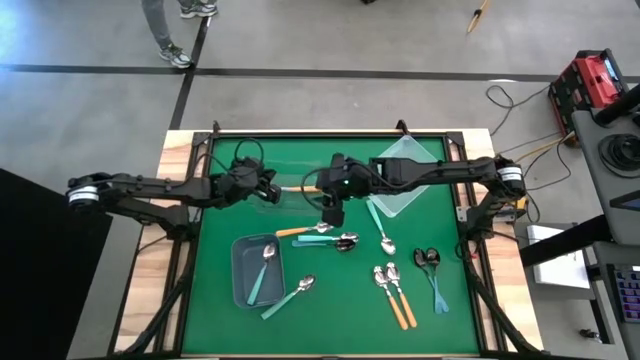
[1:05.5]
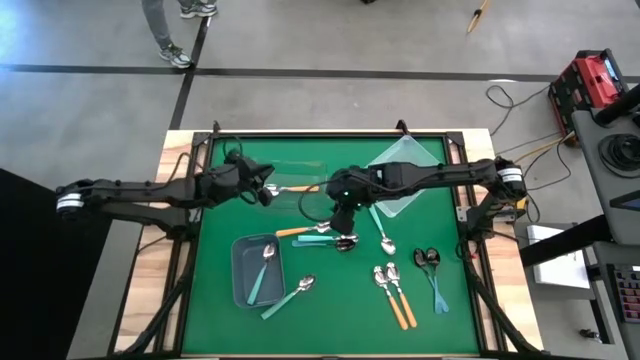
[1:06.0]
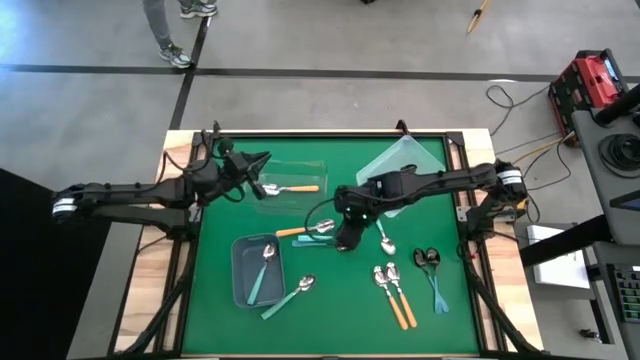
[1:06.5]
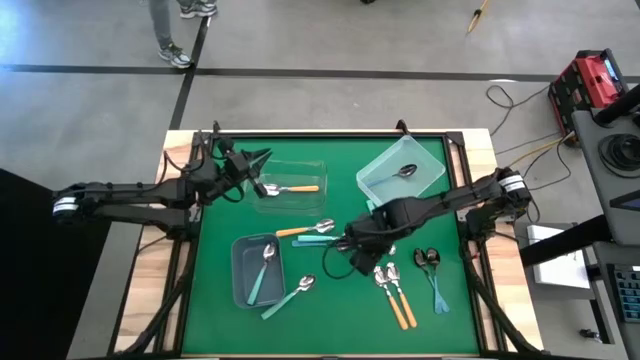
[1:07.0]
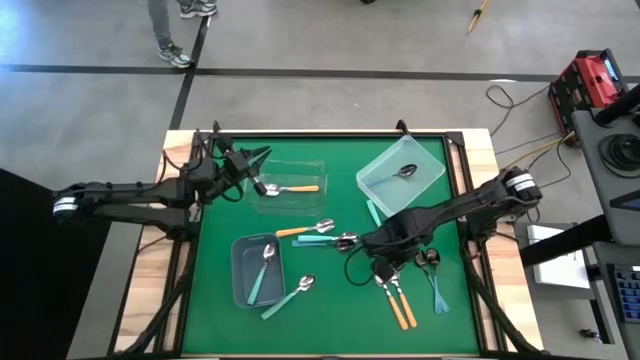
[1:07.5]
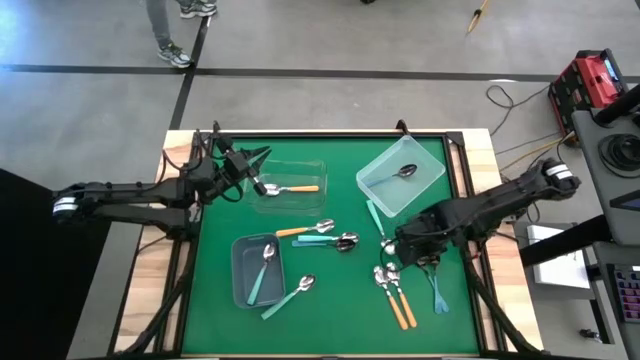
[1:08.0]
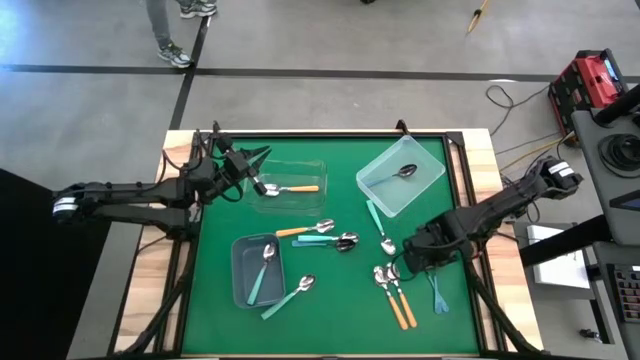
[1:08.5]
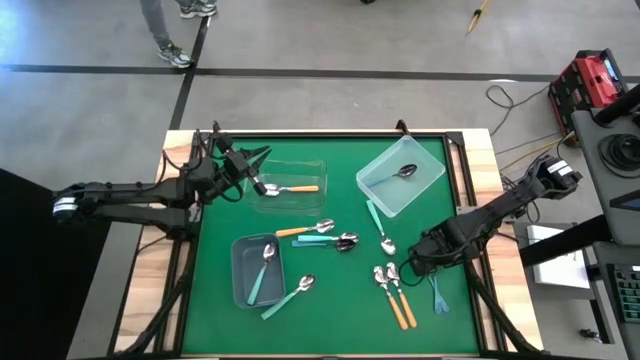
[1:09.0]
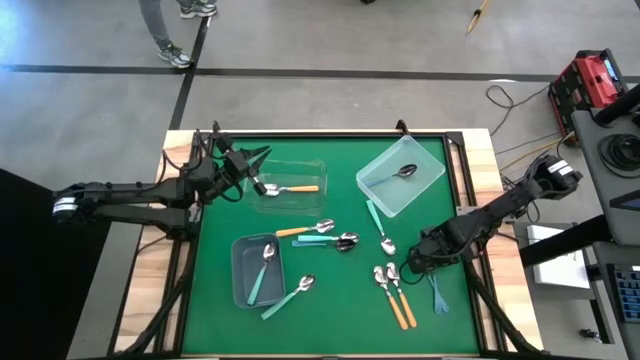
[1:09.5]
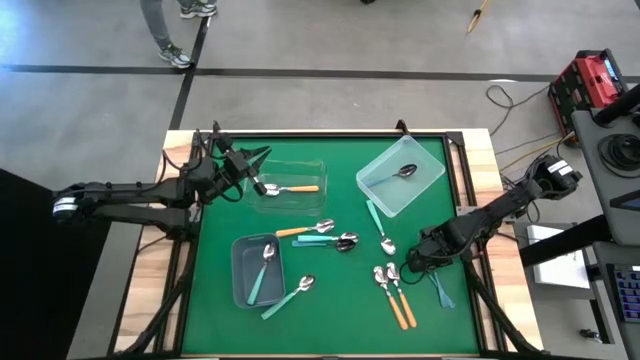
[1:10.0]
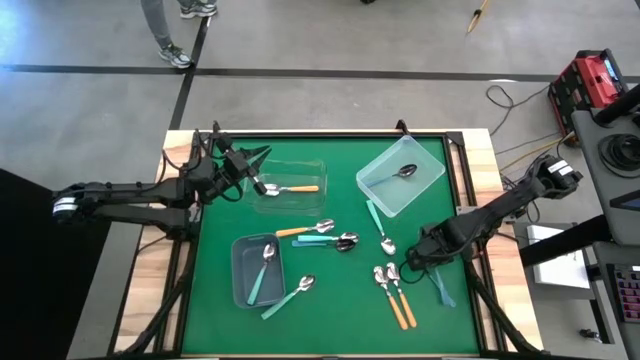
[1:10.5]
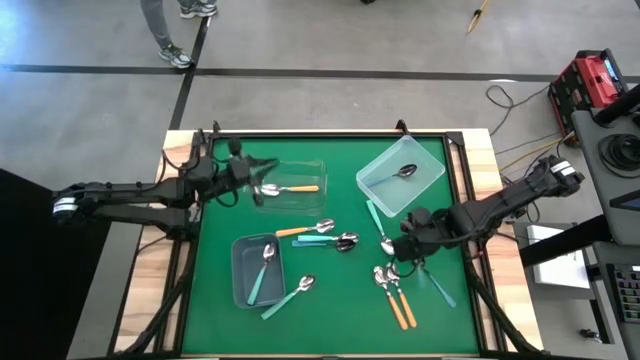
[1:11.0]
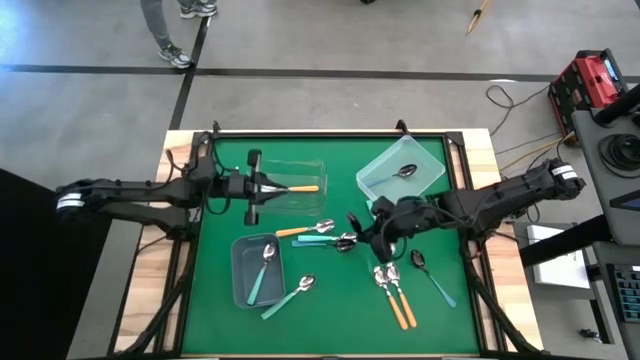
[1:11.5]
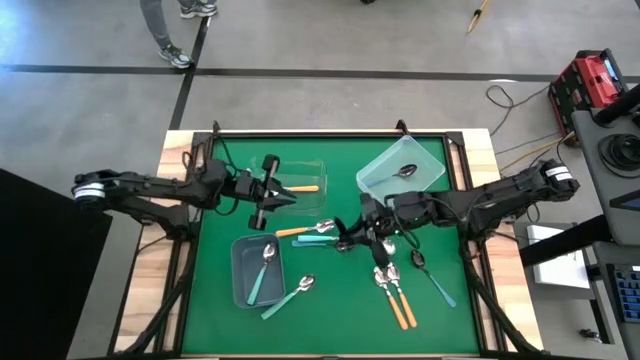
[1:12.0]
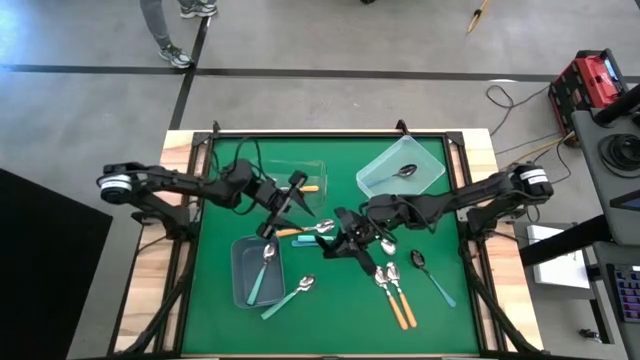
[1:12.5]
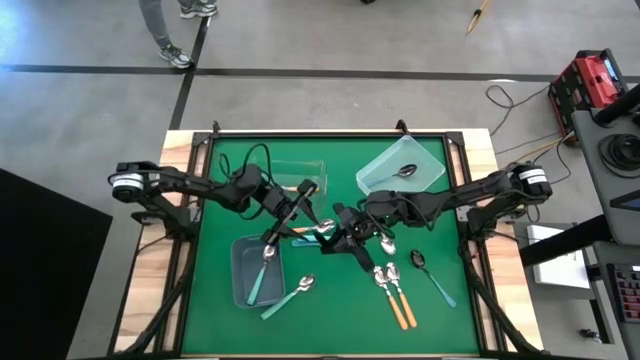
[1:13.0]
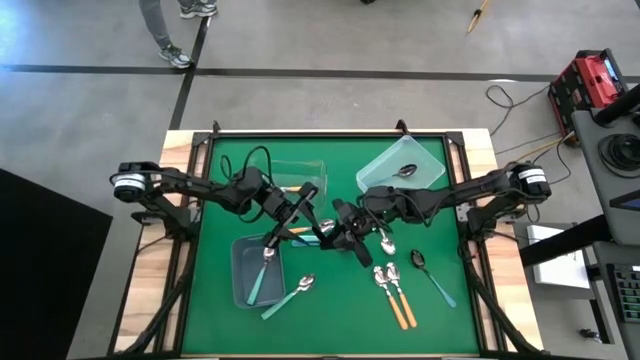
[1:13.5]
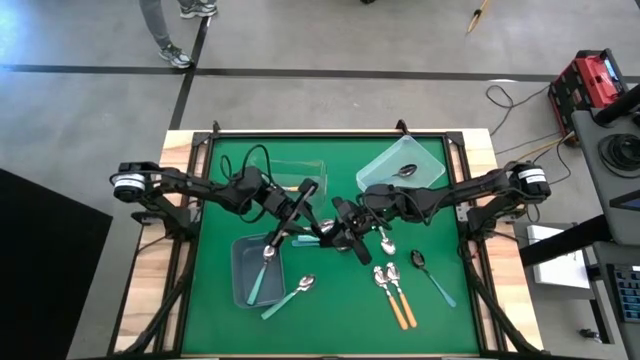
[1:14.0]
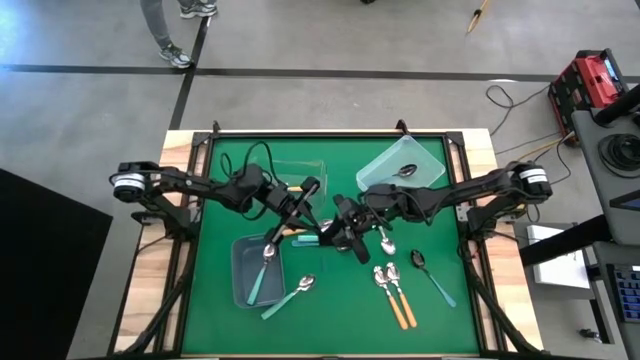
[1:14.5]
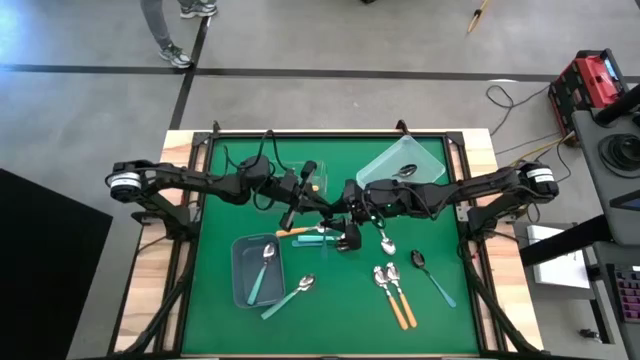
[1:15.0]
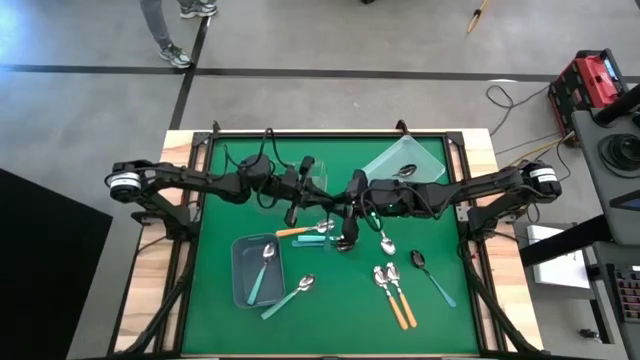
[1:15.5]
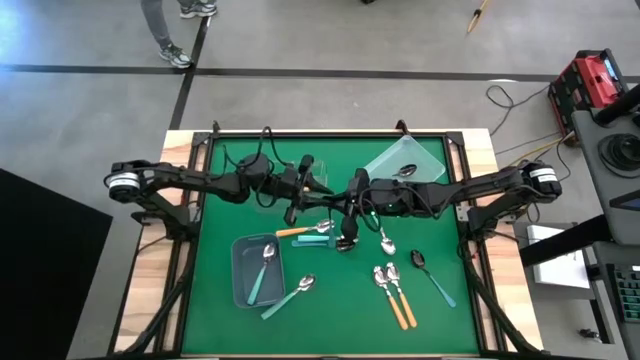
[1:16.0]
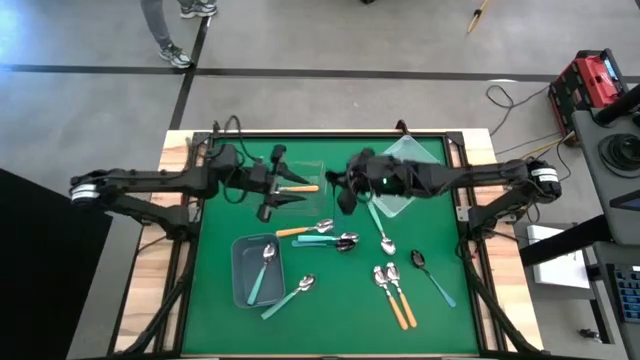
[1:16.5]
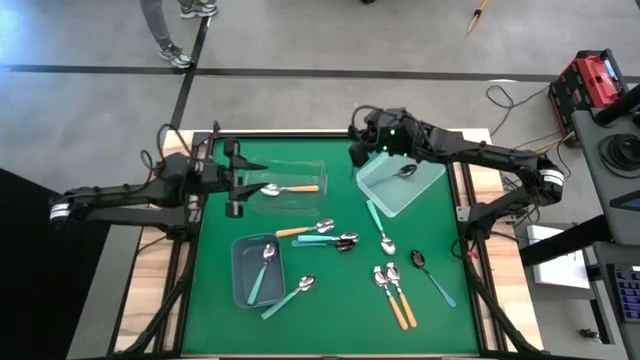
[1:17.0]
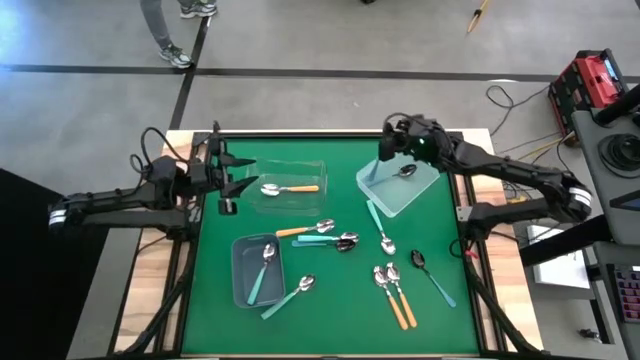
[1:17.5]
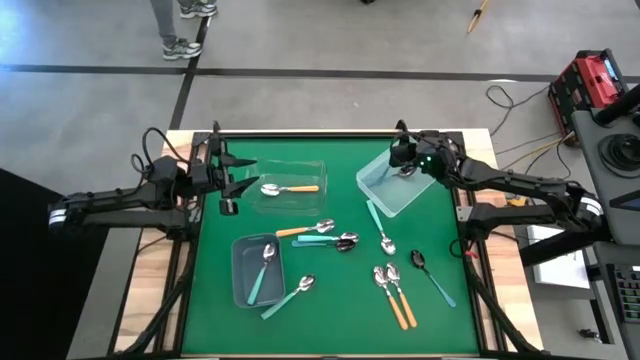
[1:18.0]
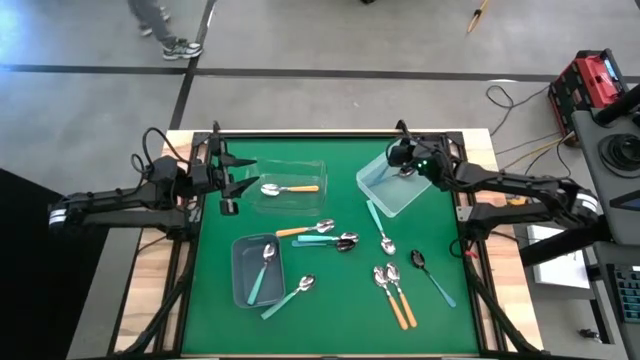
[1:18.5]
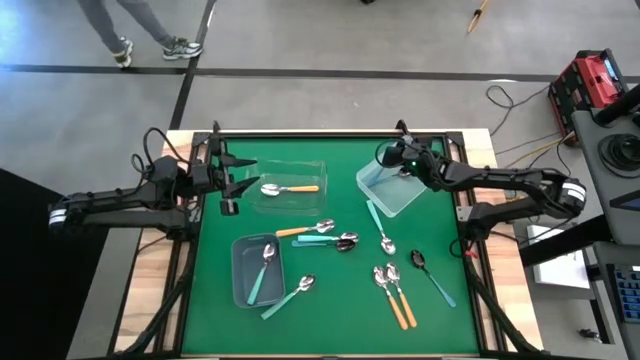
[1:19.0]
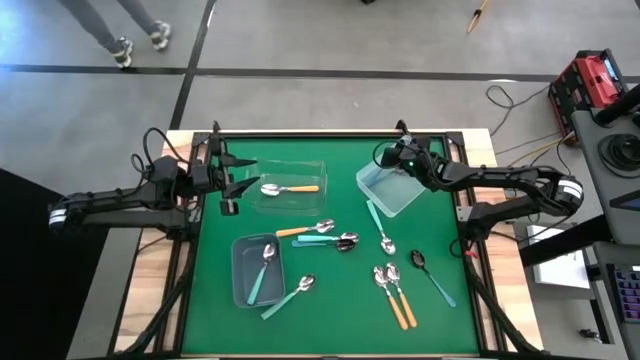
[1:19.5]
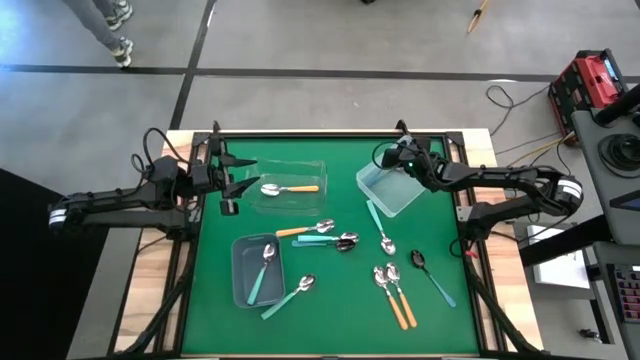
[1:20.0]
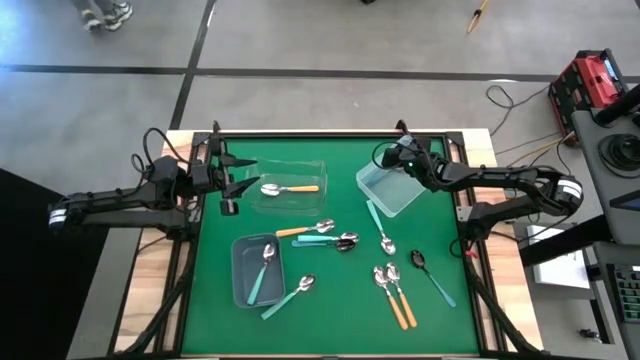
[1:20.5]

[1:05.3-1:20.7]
Task: Sort silverware by color (type)
Put the blue spoon into the white bin

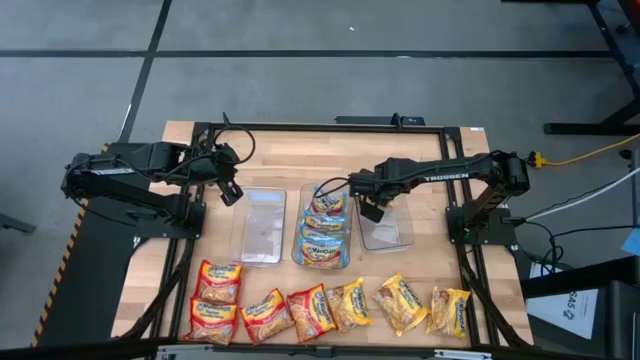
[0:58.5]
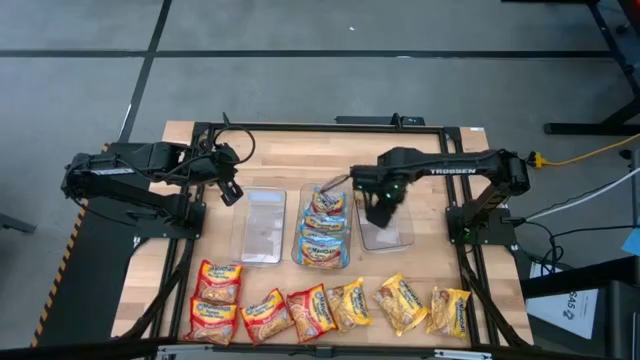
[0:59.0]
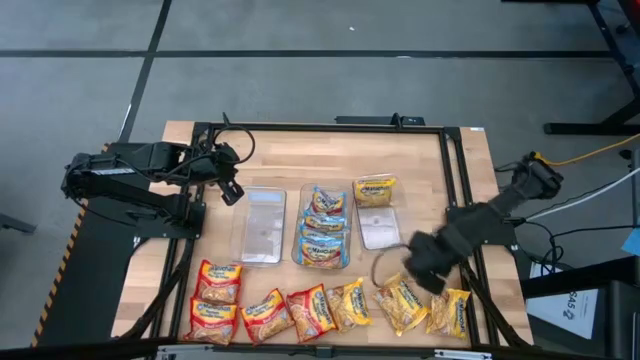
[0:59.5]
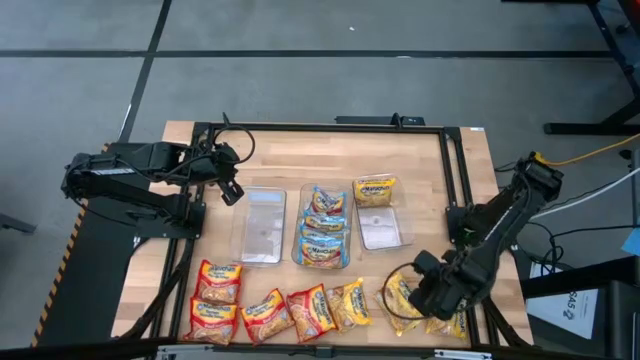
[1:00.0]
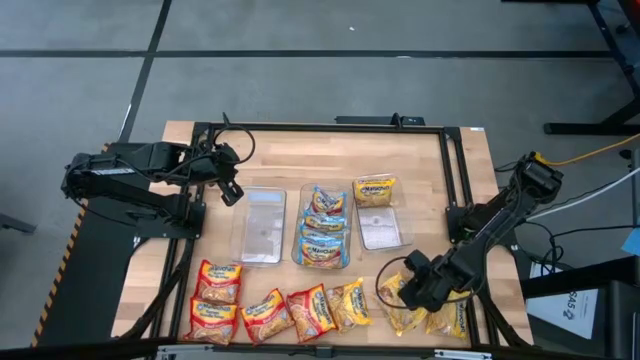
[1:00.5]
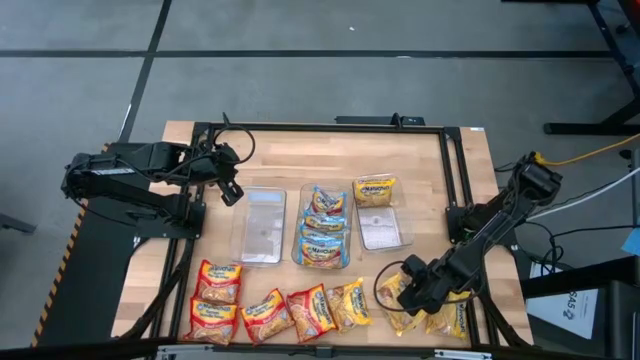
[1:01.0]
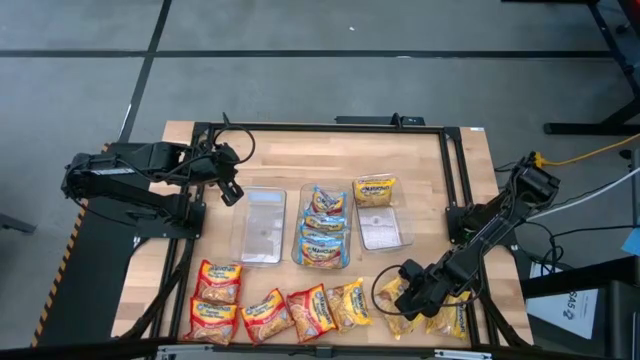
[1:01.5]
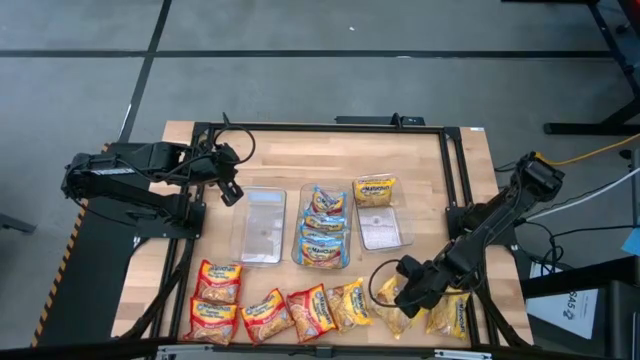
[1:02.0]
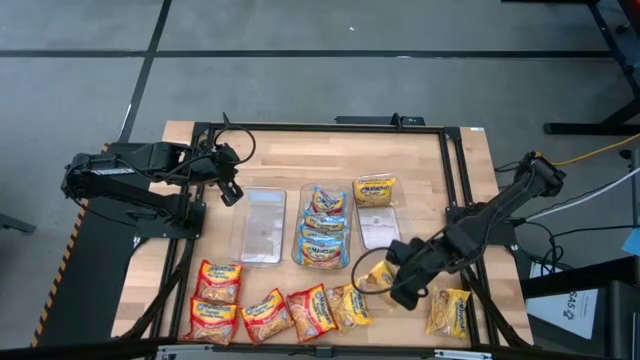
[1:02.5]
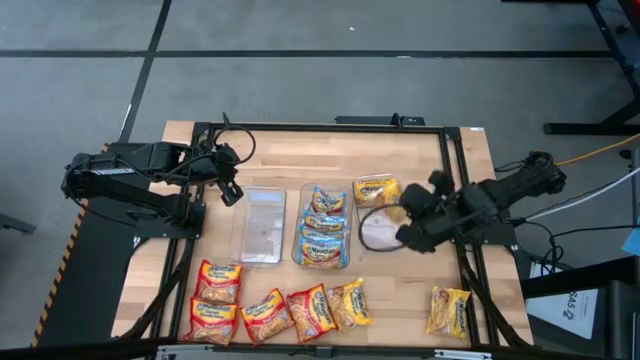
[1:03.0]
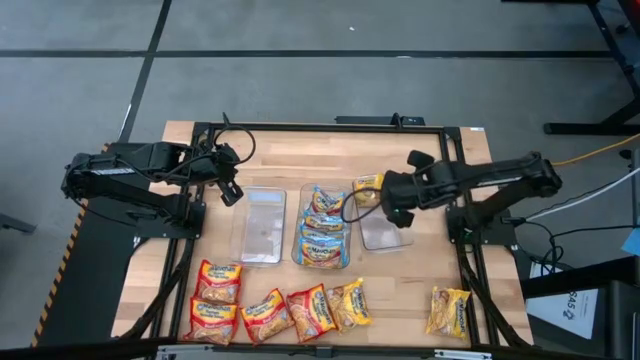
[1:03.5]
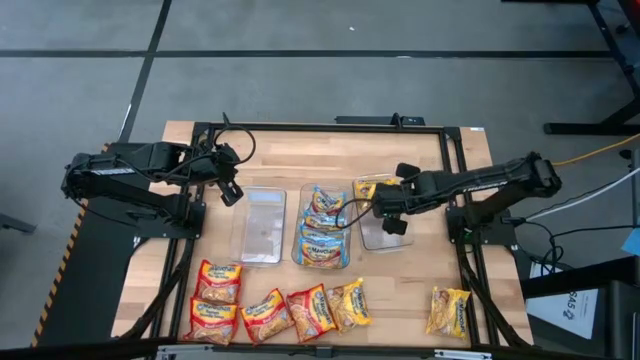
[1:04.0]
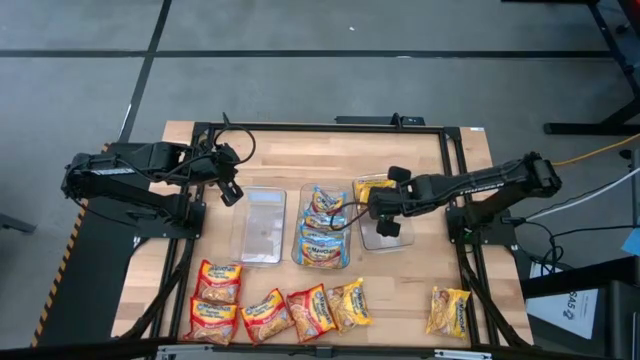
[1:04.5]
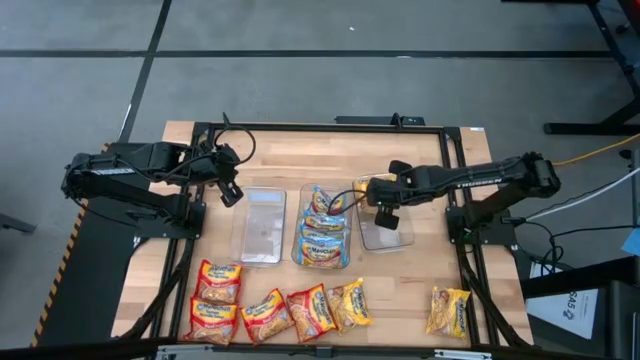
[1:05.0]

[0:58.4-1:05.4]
Task: Sort Maruchan noodles
Put the yellow noodle pack into the right transparent bin
